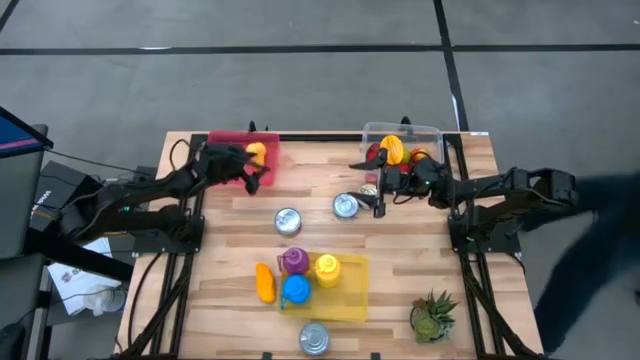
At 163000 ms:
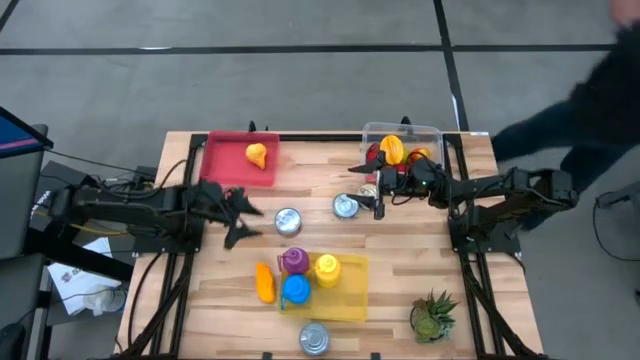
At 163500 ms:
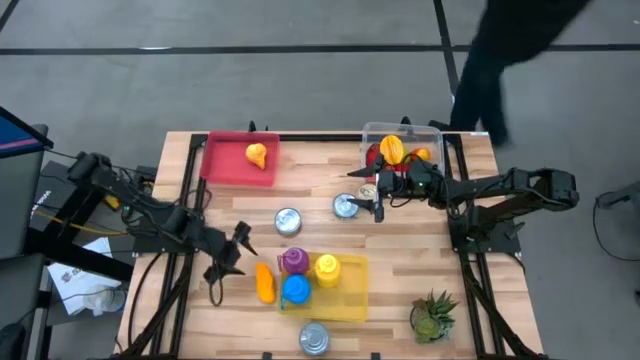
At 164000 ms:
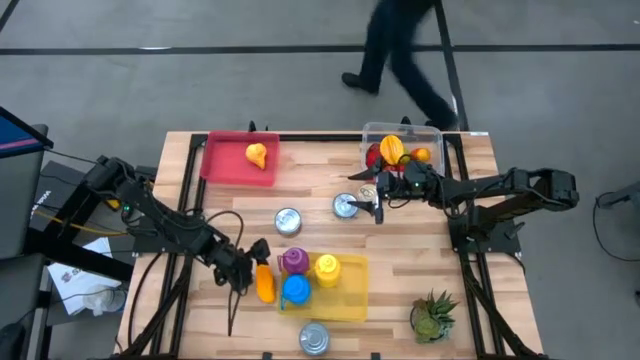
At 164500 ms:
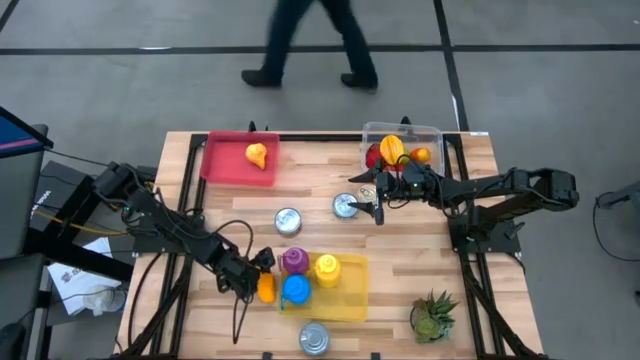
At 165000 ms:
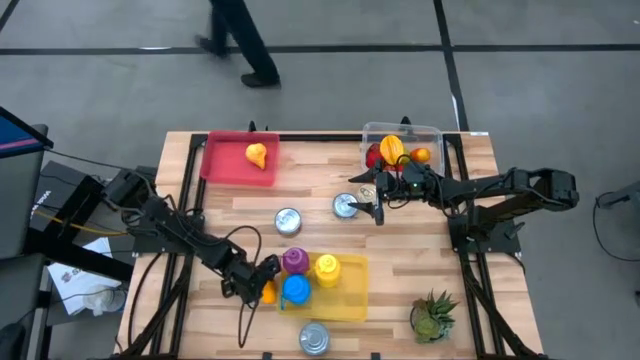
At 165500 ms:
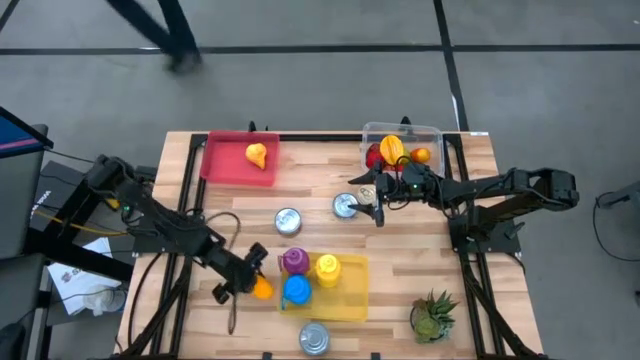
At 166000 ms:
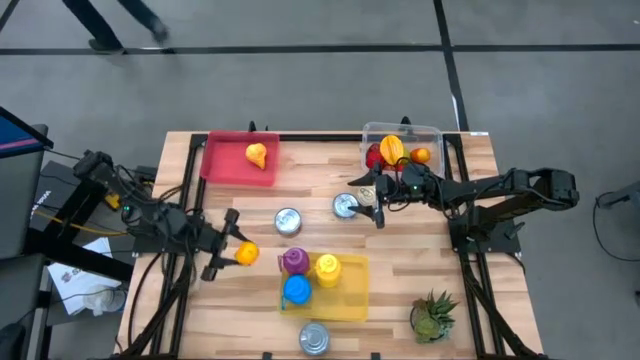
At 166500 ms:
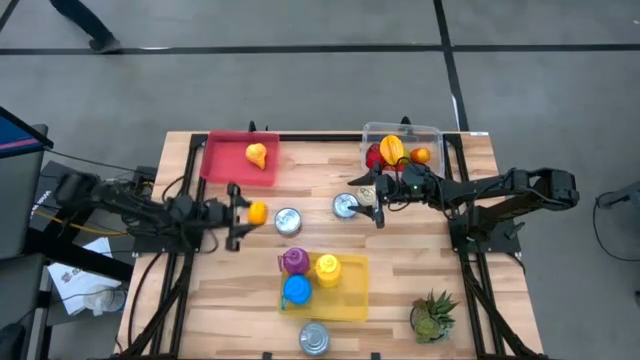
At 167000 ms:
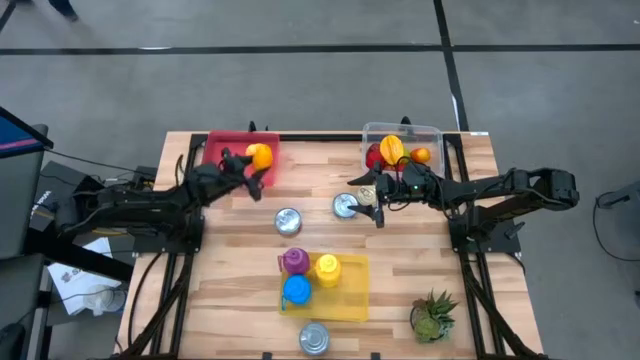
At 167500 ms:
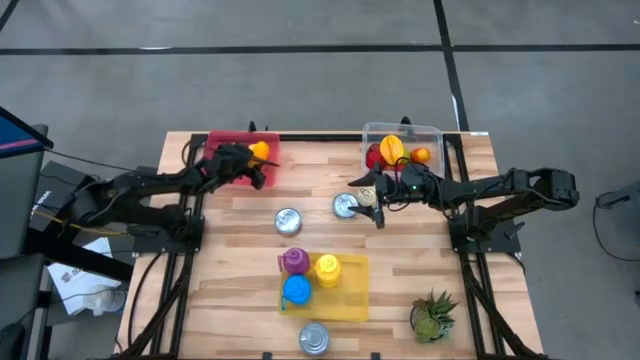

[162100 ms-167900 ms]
Task: Pick & Place Food Item
Put the mango into the red bin

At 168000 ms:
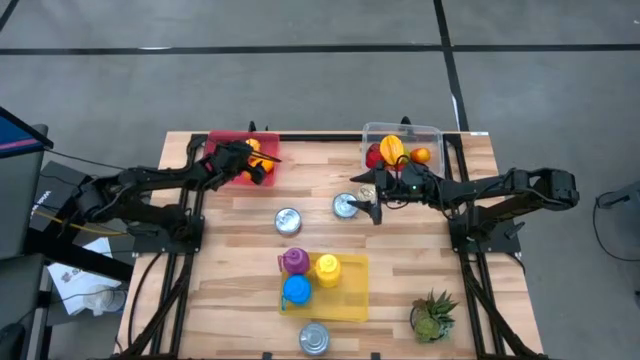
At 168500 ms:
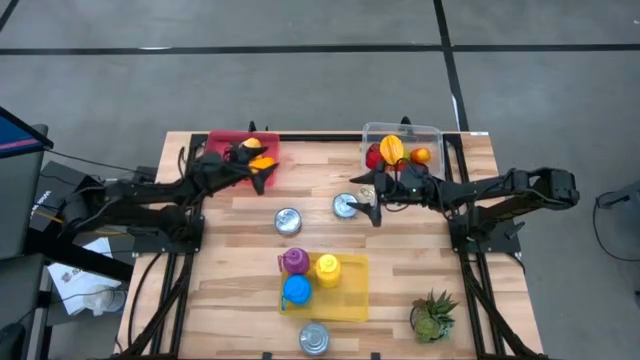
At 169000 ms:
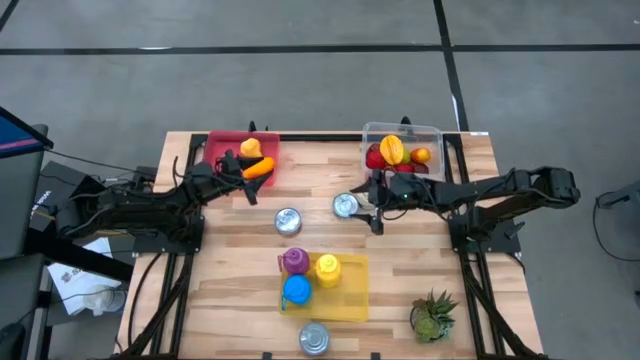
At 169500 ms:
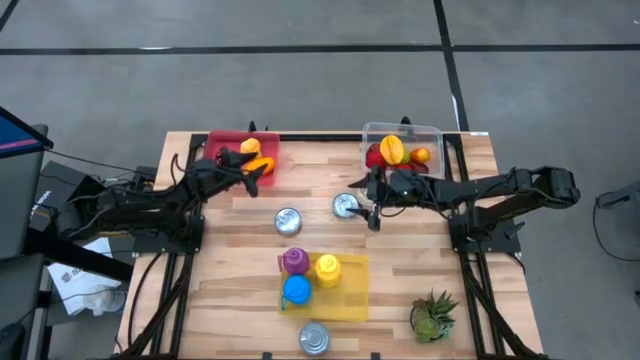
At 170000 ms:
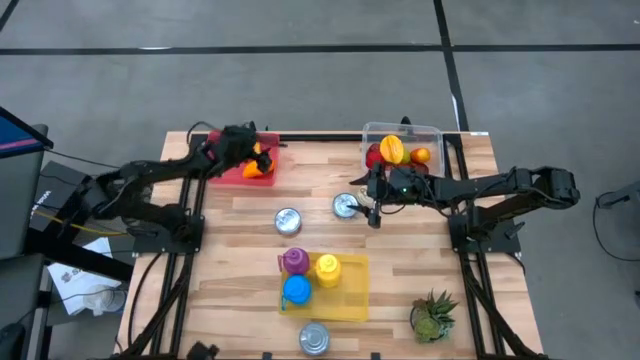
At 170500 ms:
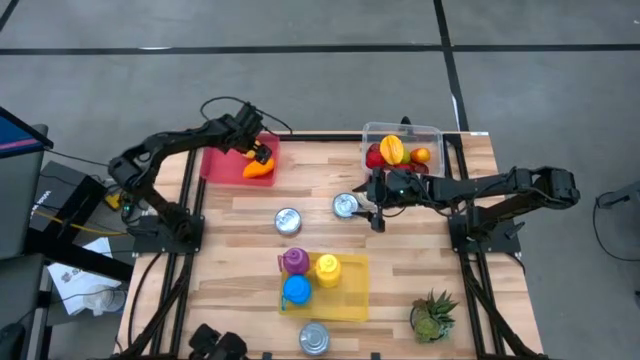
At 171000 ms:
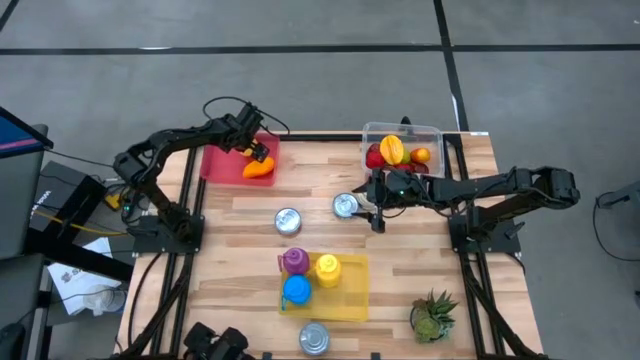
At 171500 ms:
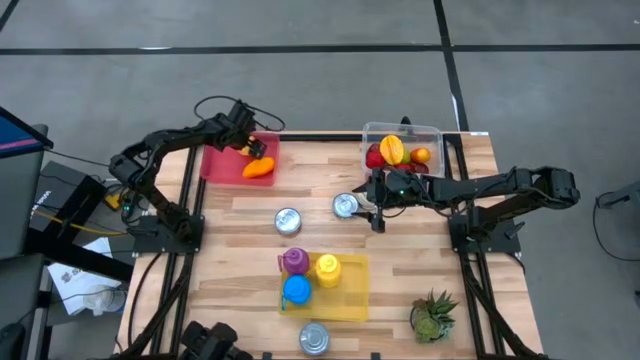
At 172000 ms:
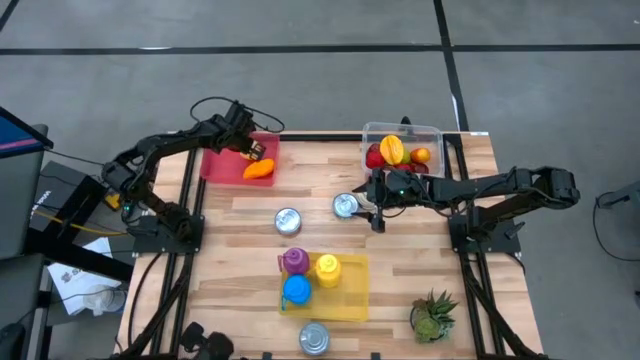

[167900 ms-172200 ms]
Put the pear from the red bin into the transparent bin

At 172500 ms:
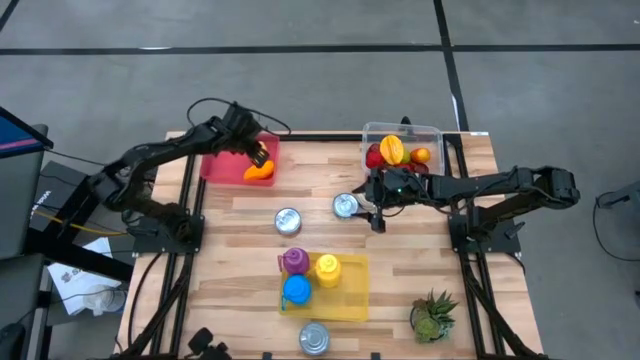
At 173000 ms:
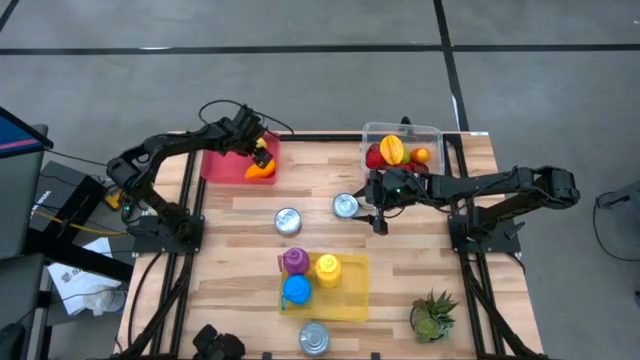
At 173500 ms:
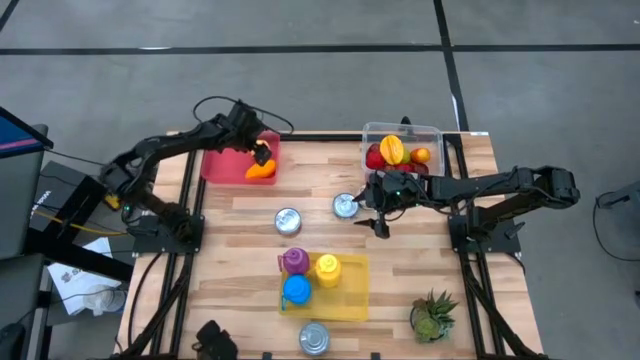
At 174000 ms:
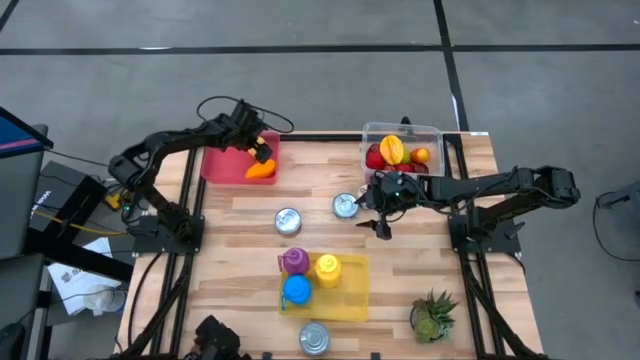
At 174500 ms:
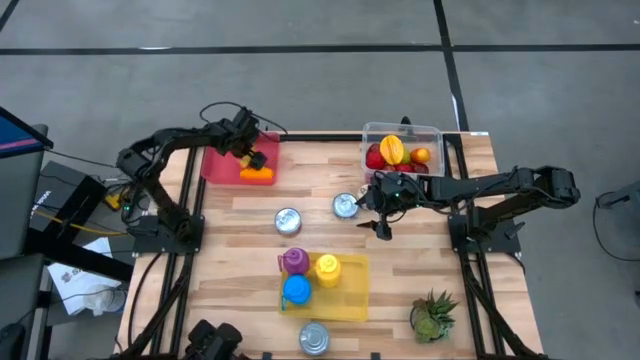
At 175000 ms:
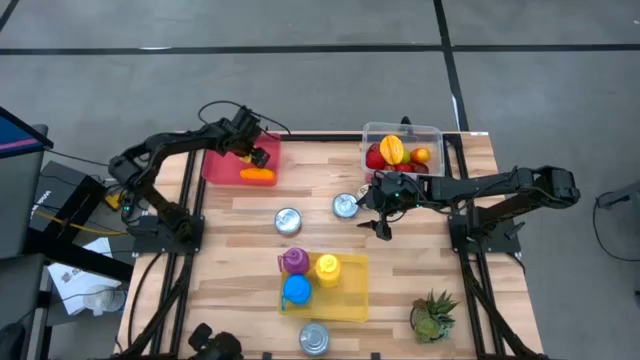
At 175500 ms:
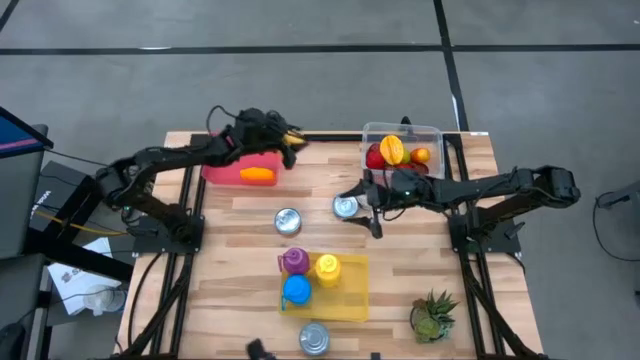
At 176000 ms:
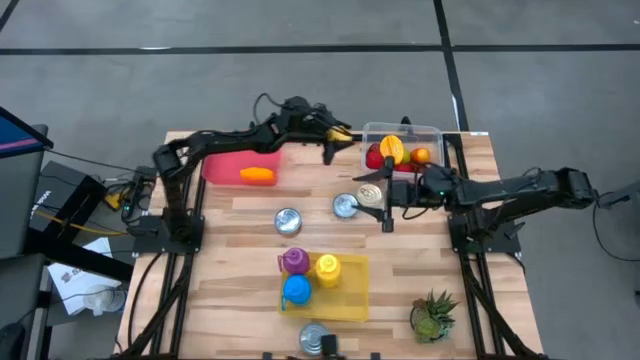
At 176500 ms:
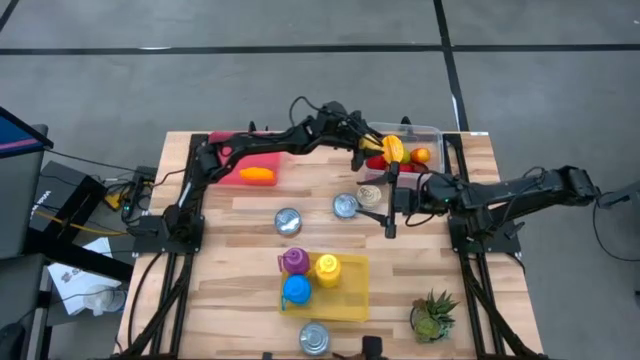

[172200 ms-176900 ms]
Put the pear from the red bin into the transparent bin

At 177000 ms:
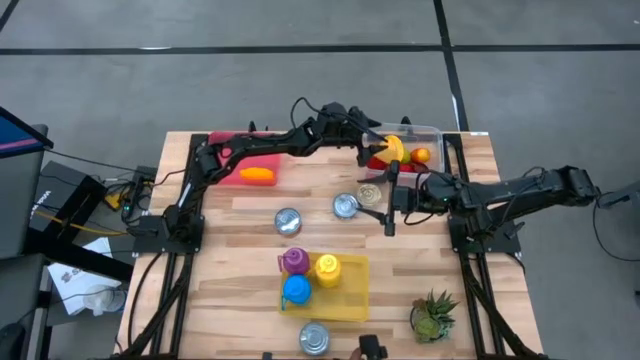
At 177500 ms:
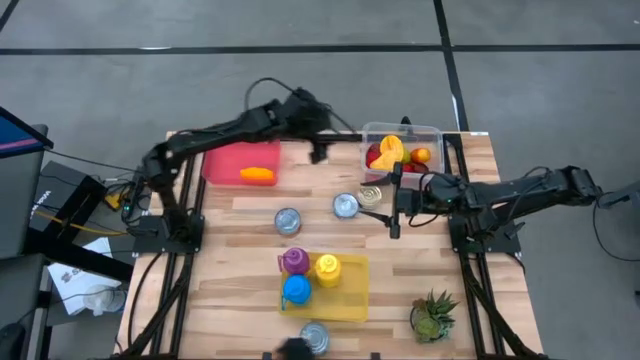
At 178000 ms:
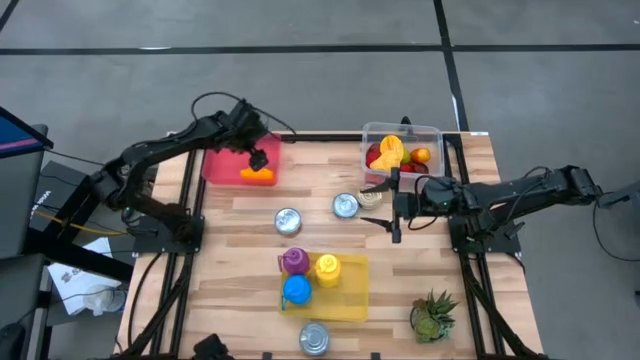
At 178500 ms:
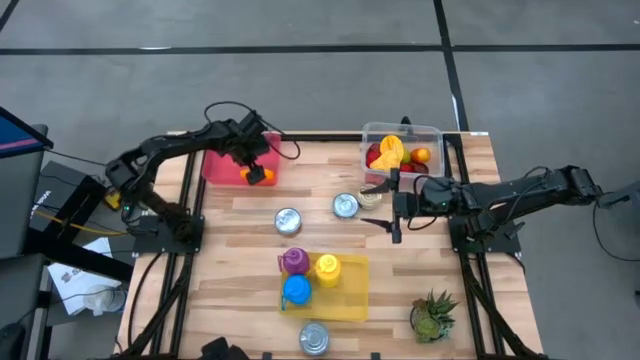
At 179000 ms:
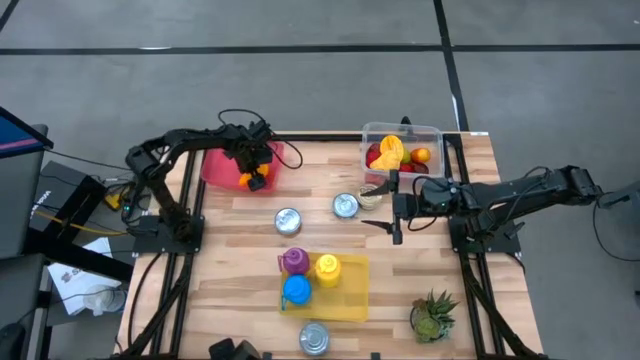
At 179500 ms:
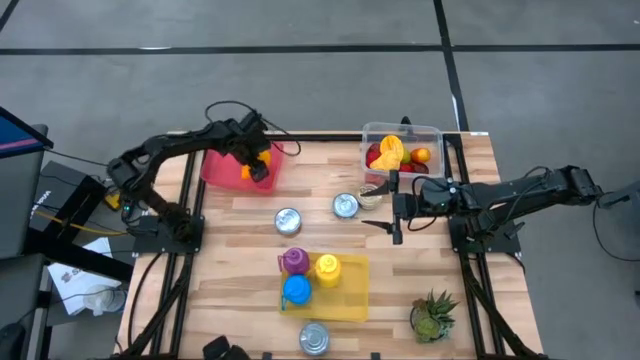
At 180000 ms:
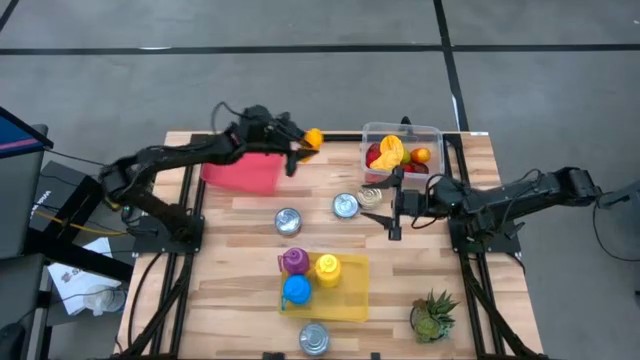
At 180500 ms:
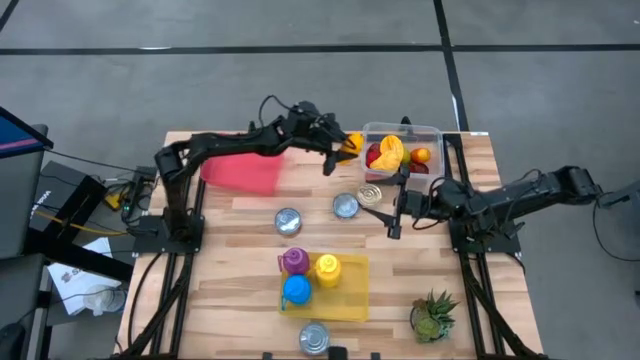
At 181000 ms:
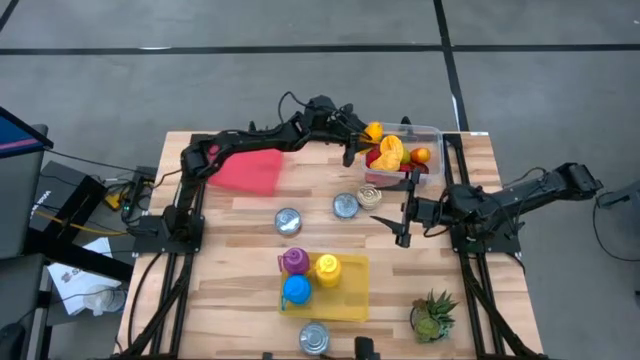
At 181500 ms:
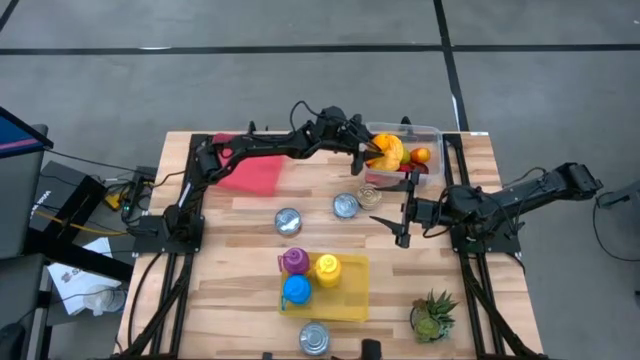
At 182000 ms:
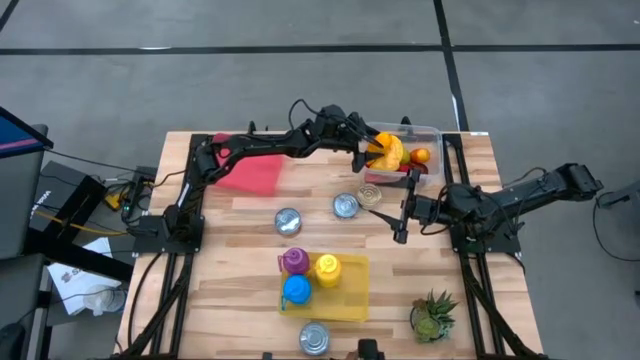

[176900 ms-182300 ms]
Put the mango from the red bin into the transparent bin

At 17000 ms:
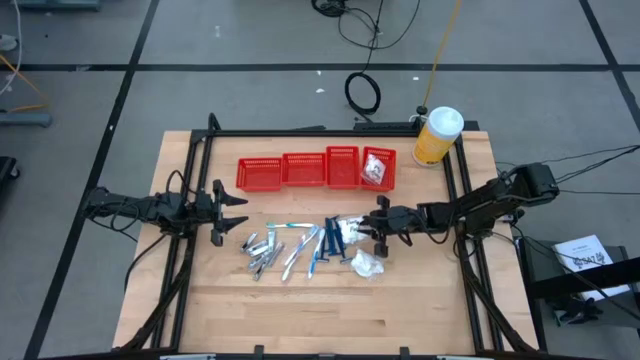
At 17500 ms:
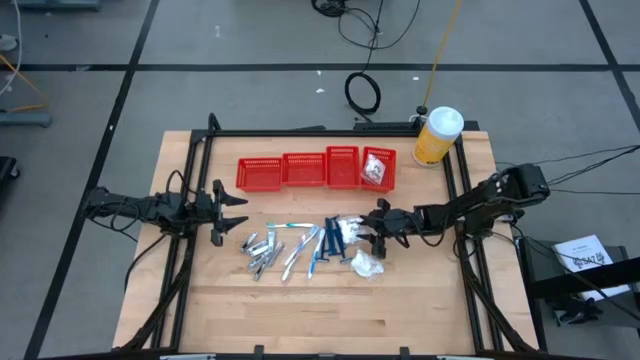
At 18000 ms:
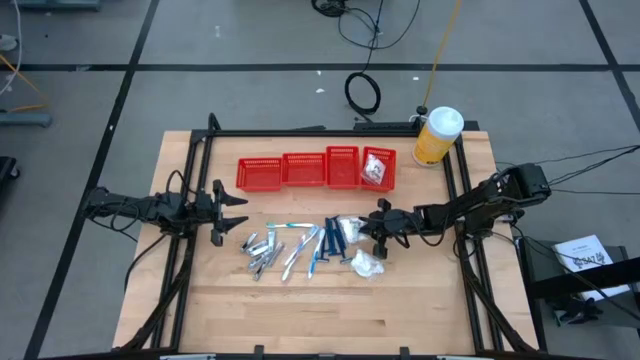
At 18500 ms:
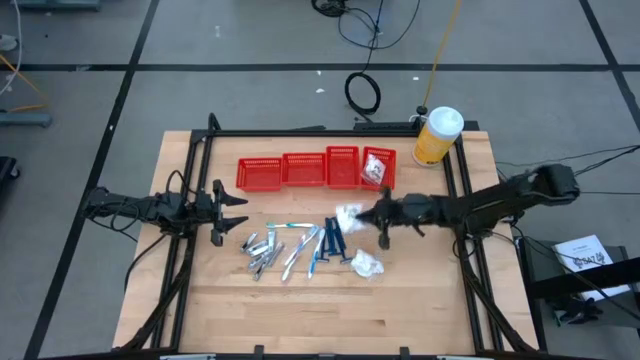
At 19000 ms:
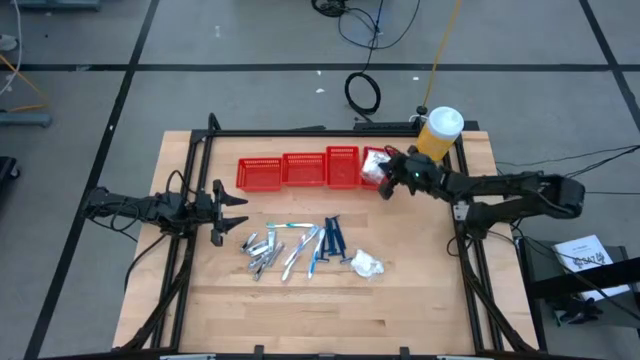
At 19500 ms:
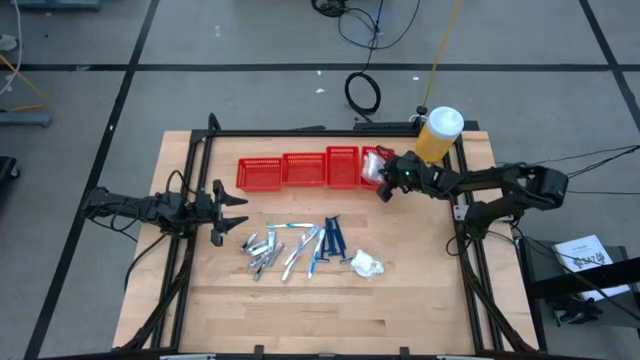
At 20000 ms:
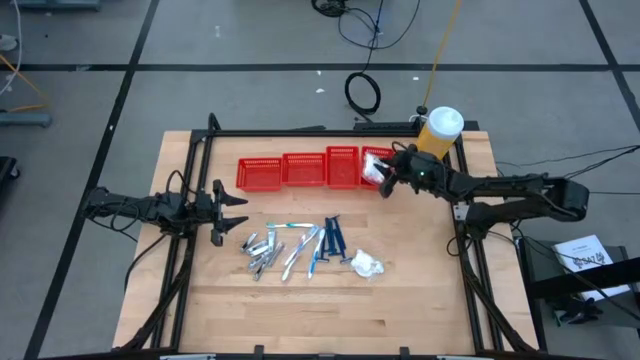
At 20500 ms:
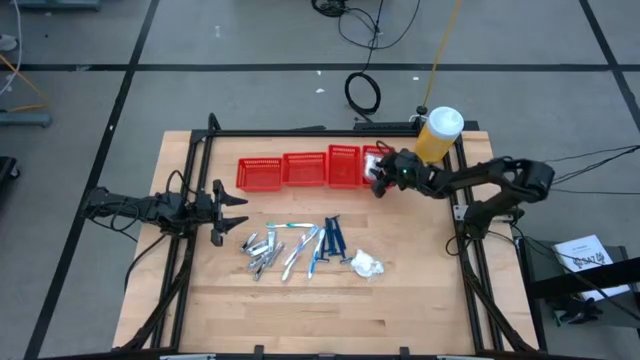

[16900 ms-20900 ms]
Task: Pick & Place Travel size toiletries
Put the top vanity pack into the vertical right red bin
